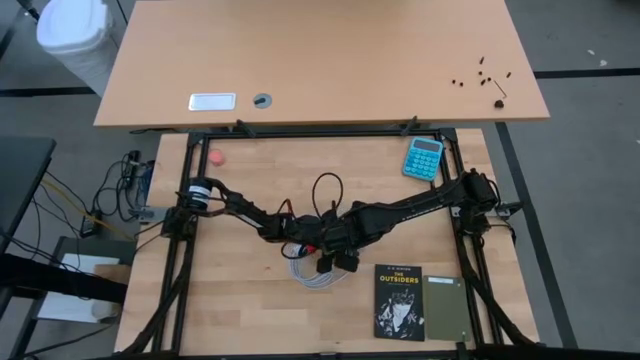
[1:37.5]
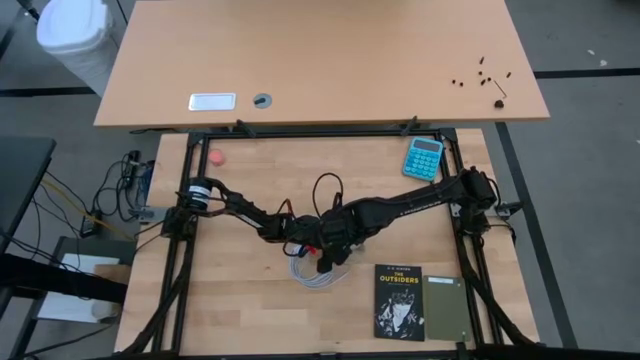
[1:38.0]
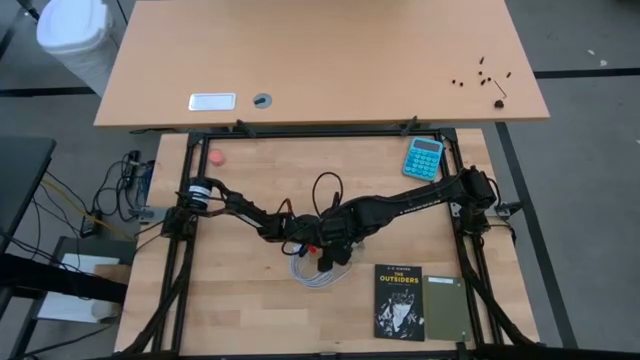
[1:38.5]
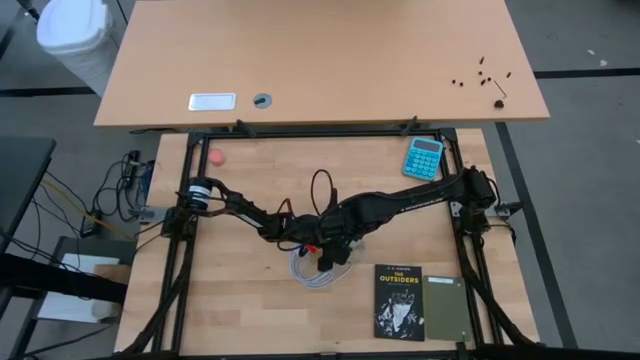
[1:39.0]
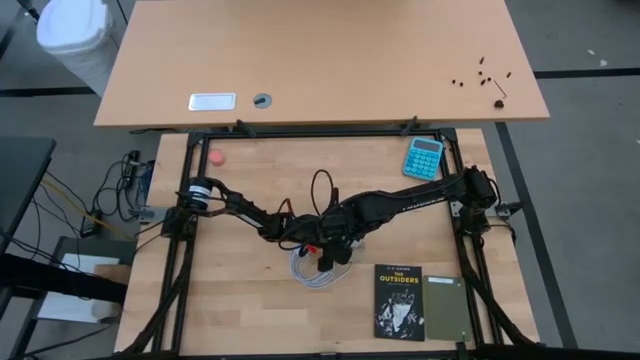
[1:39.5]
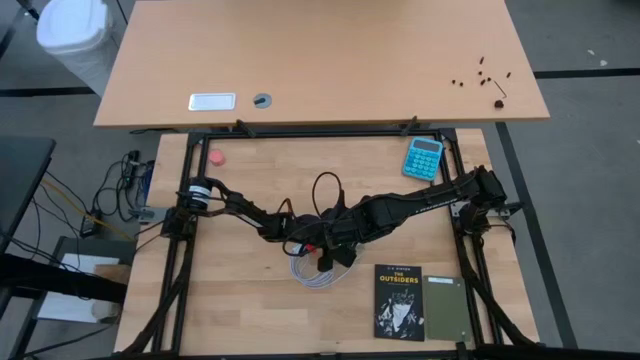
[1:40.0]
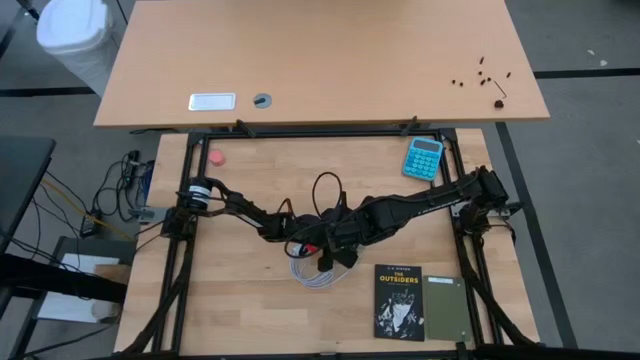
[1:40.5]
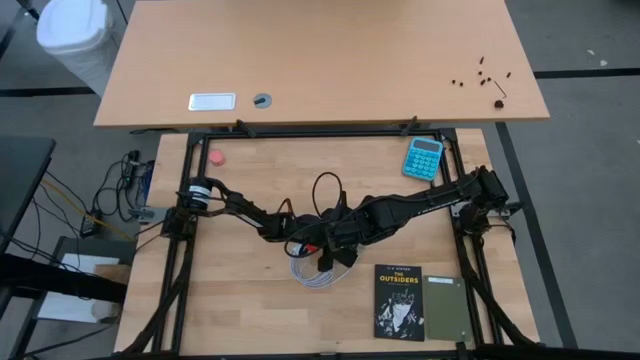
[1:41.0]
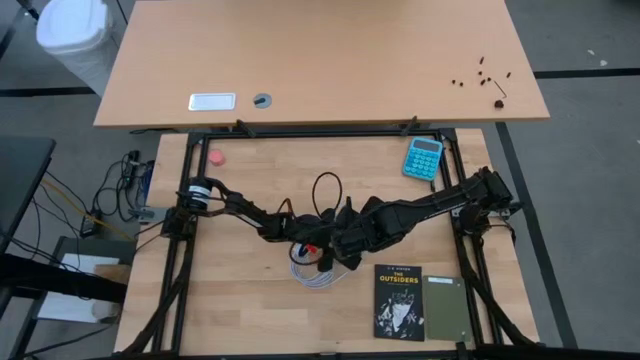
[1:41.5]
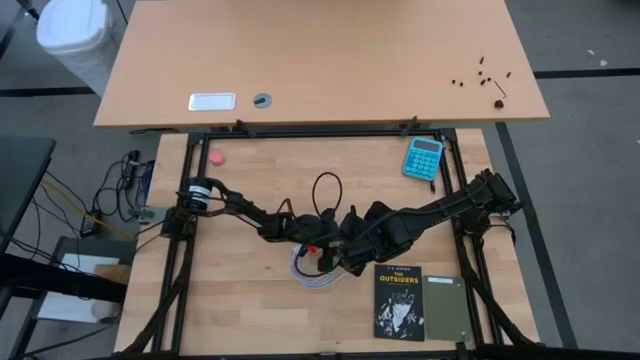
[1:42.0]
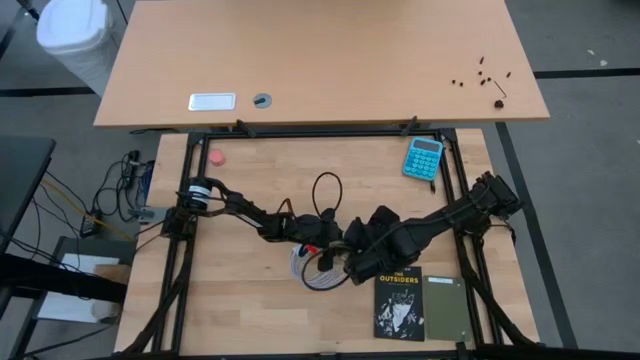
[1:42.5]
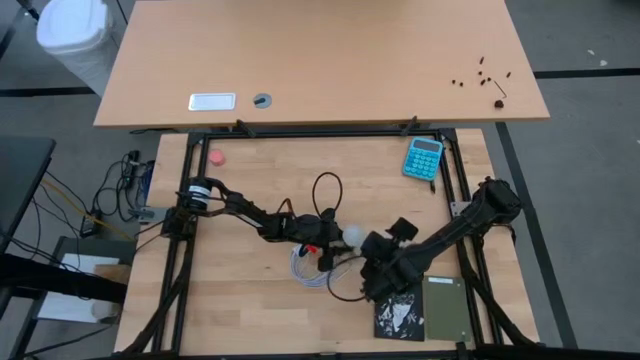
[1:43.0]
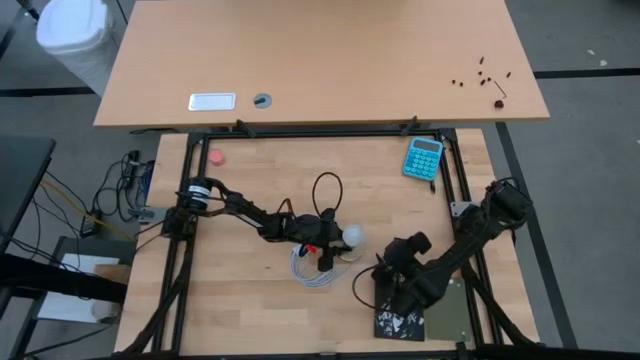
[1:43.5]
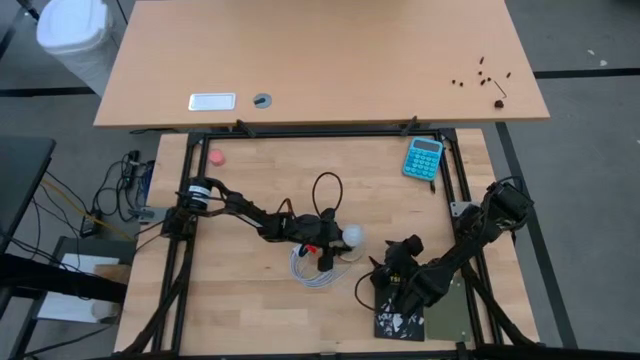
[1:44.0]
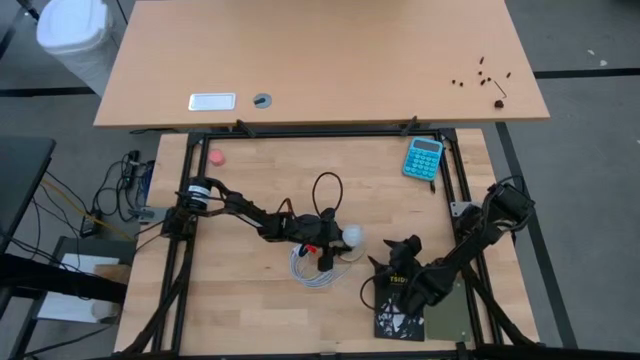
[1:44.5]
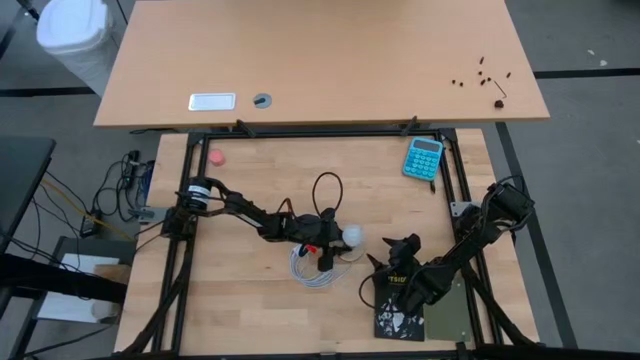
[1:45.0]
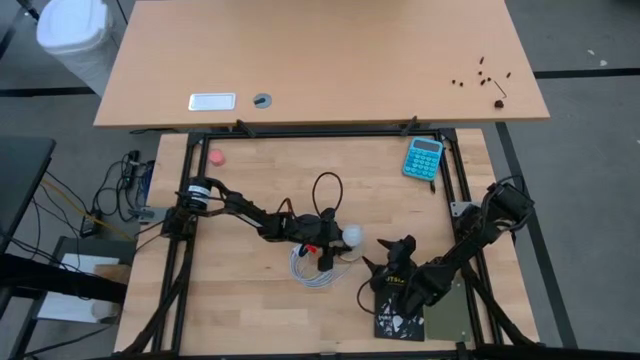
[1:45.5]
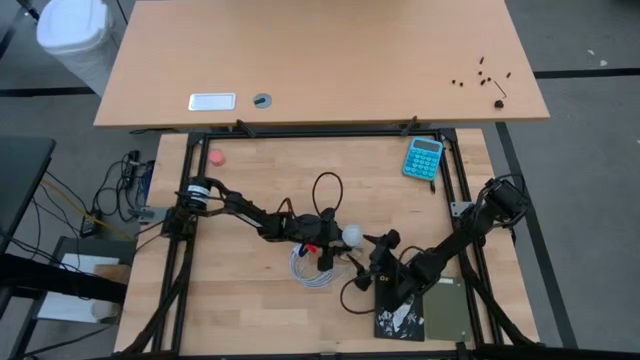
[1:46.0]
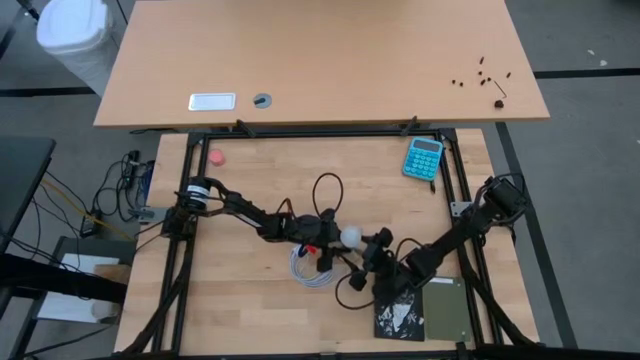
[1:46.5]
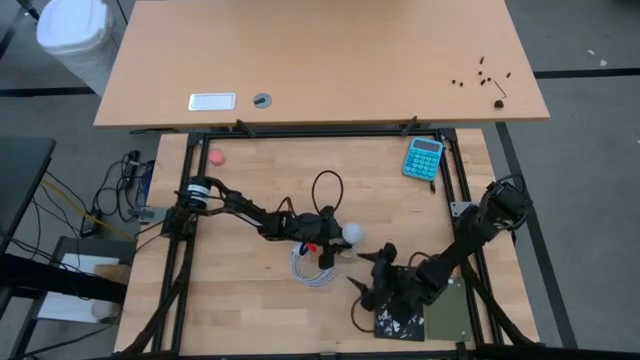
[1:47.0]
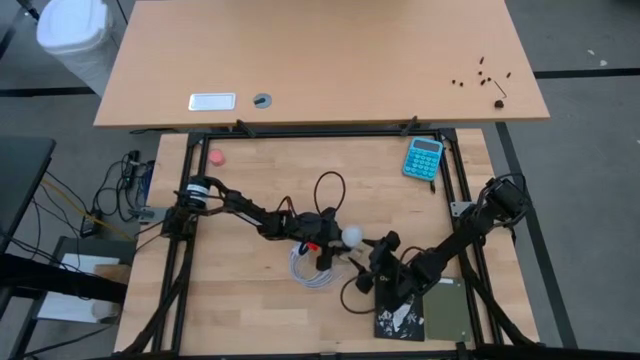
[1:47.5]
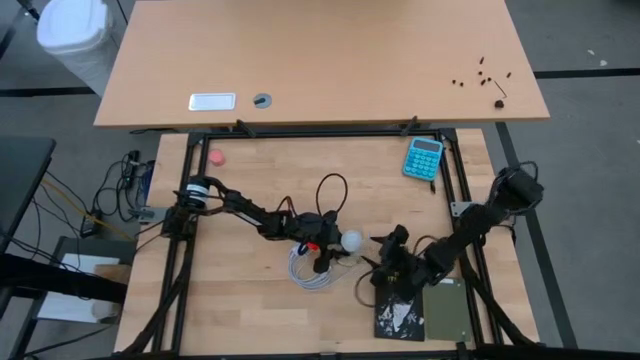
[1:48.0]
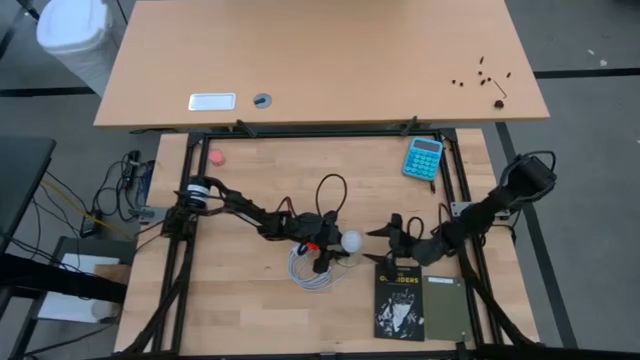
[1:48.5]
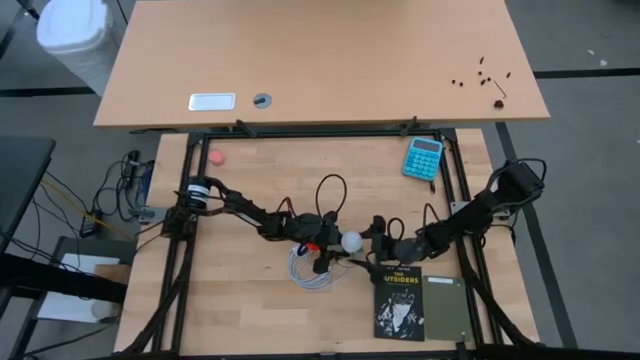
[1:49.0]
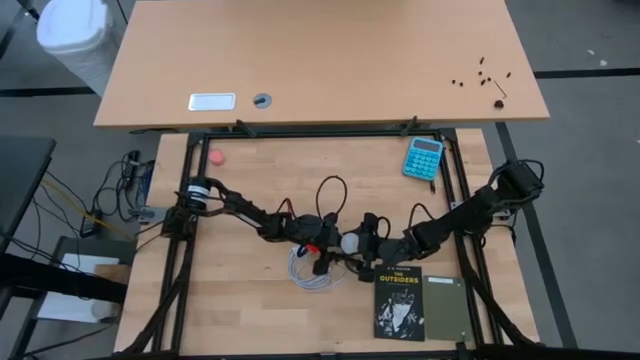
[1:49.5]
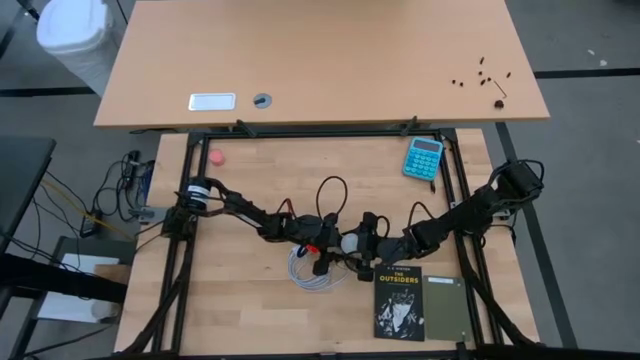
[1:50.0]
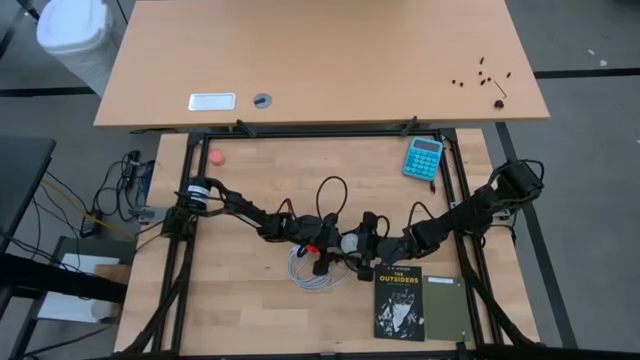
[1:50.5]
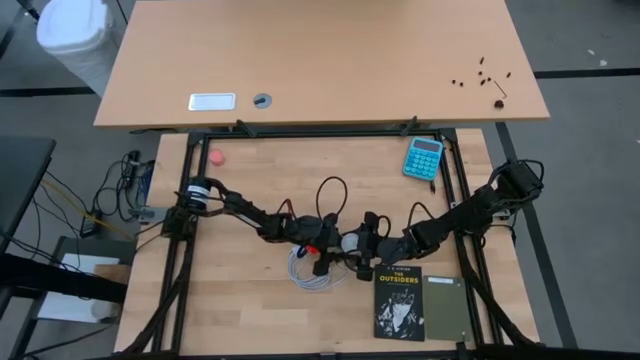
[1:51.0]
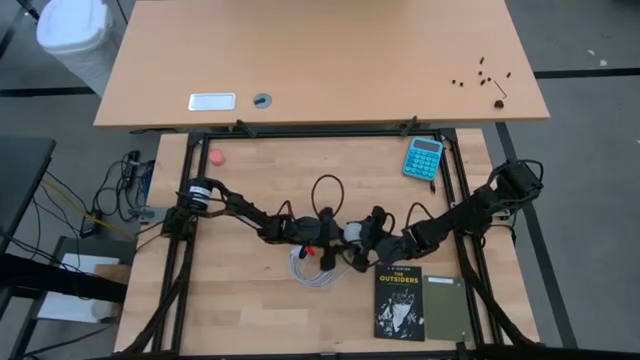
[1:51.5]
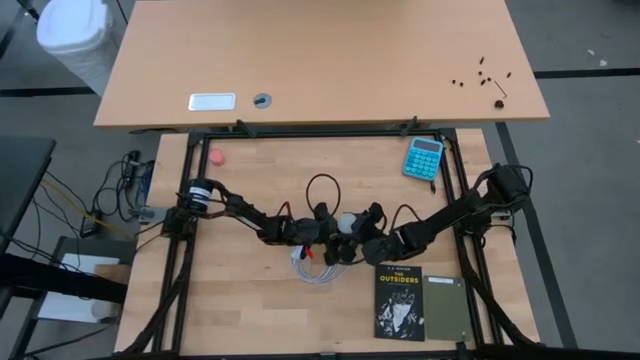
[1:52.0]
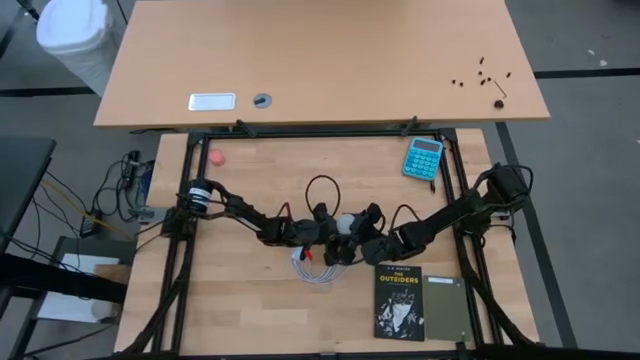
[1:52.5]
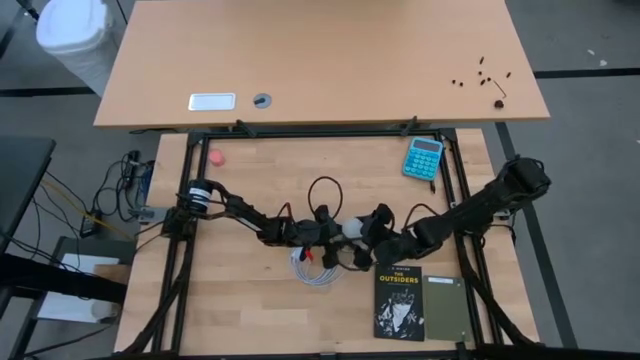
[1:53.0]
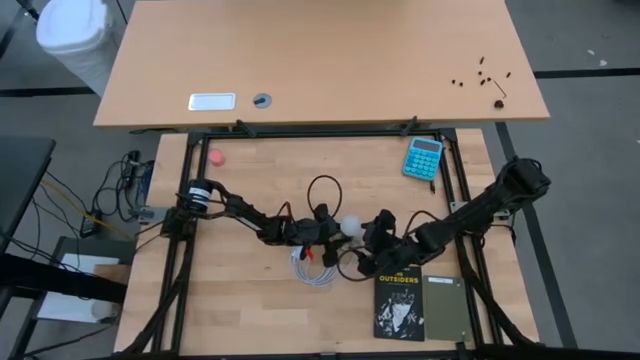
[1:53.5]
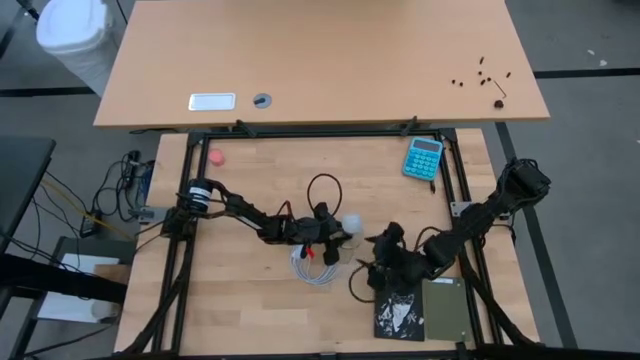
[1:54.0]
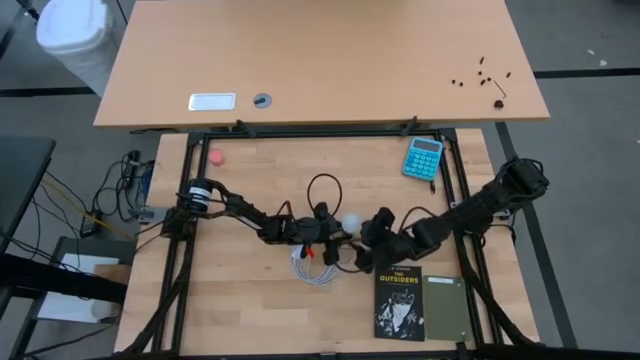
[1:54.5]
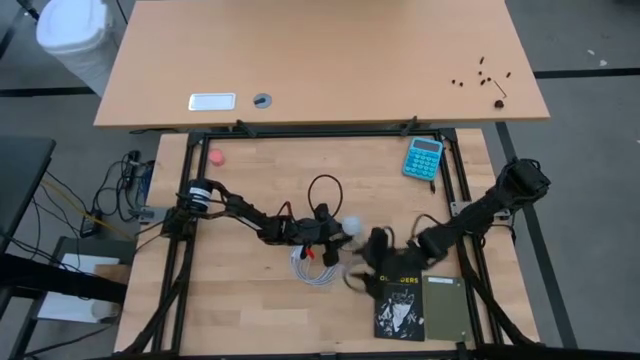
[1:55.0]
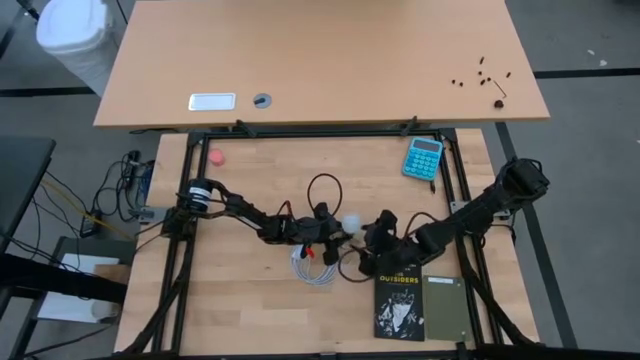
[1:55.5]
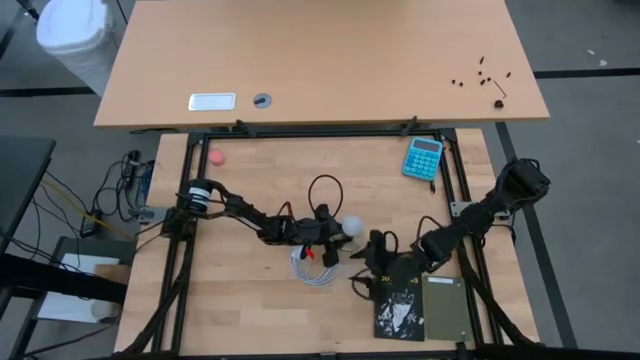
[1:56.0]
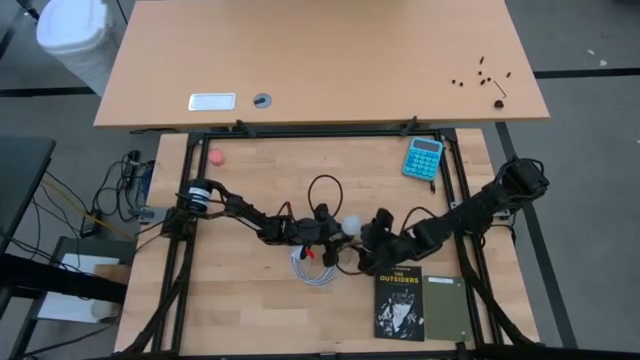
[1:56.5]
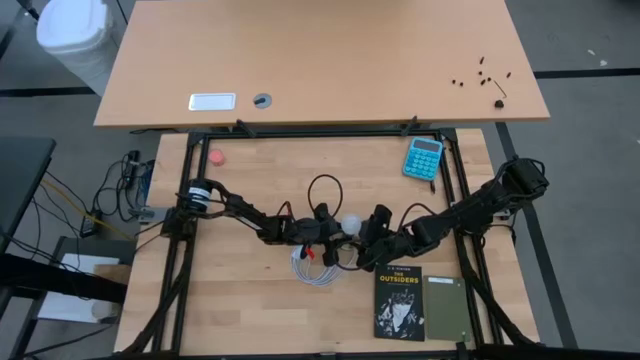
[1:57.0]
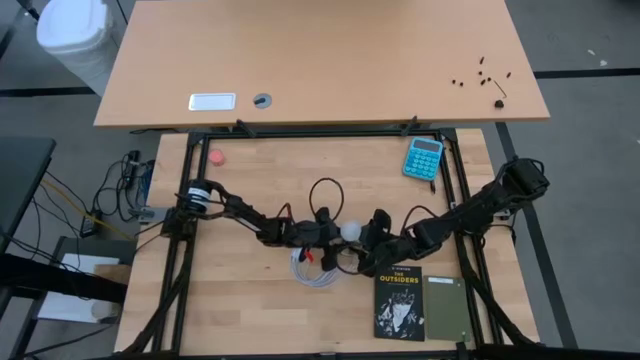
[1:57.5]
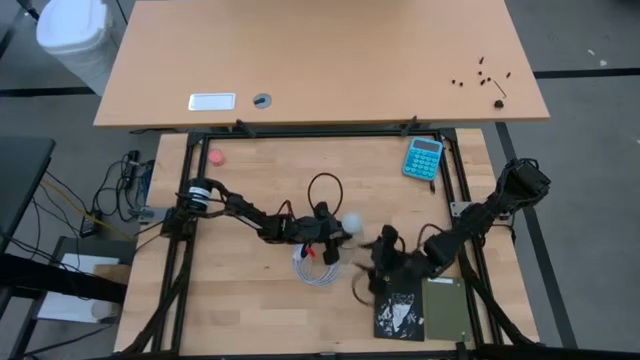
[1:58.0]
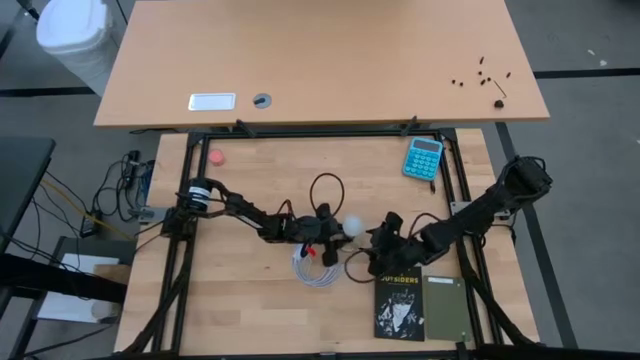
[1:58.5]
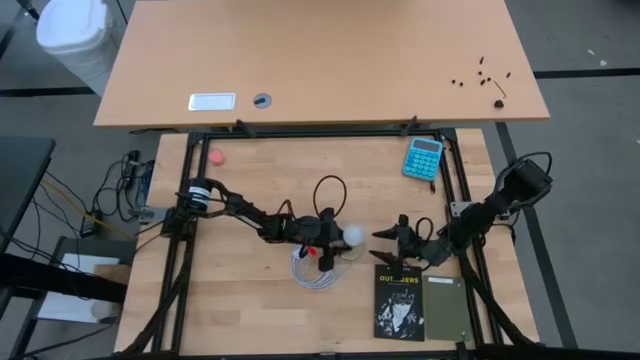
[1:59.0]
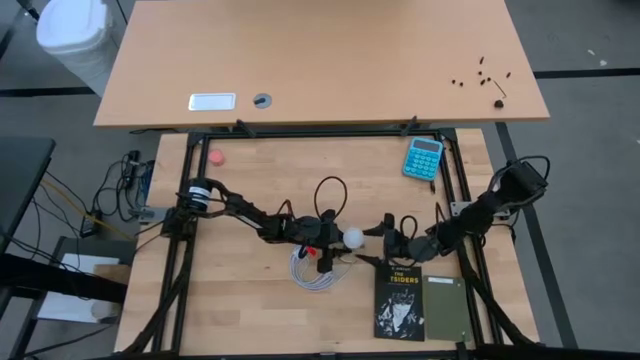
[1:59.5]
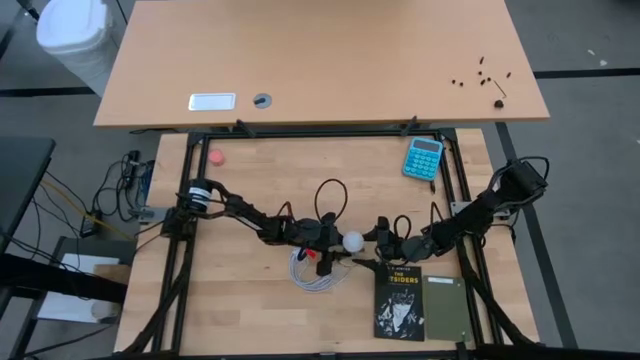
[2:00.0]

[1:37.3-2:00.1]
Task: Screw lightbulb
Insert the white lightbulb into the silver lamp
